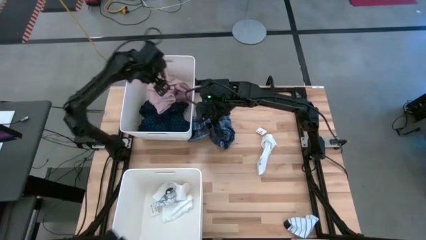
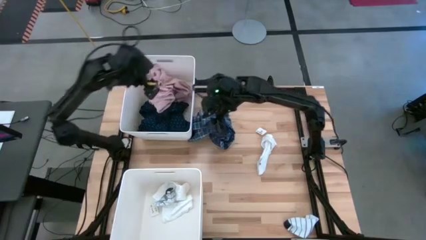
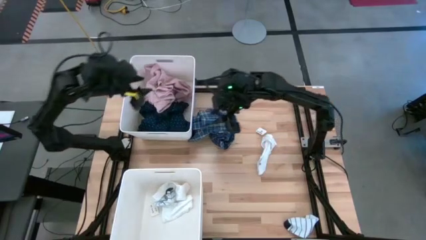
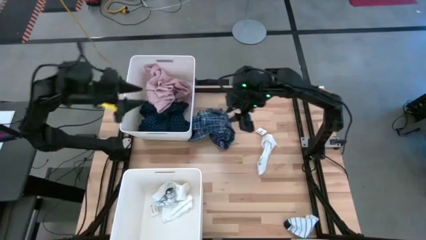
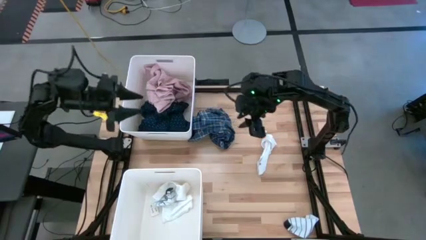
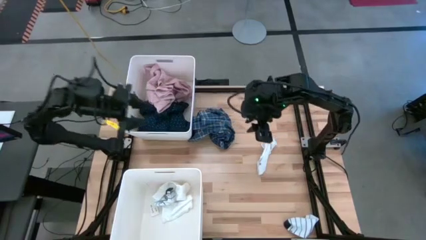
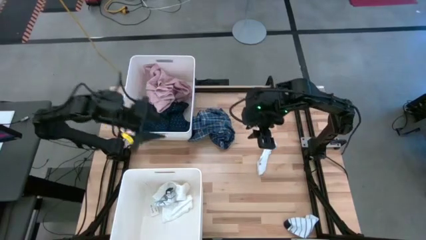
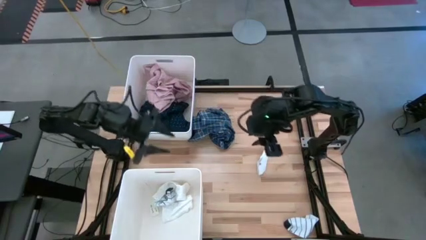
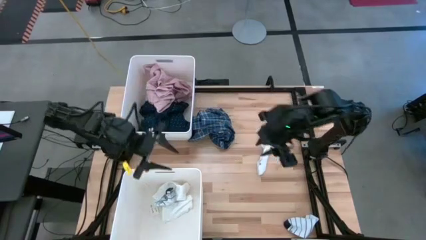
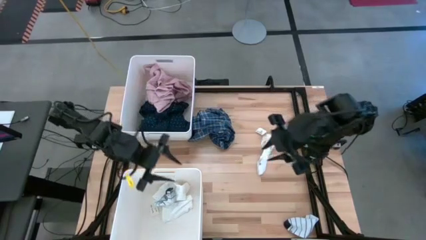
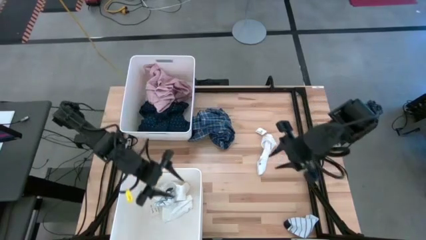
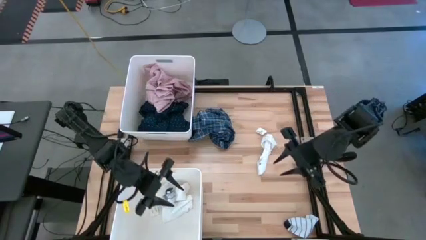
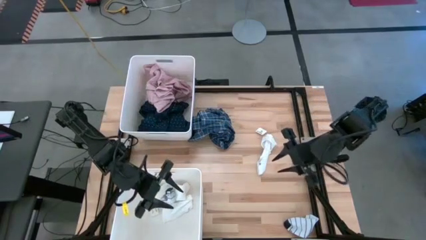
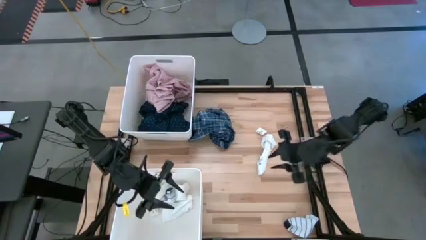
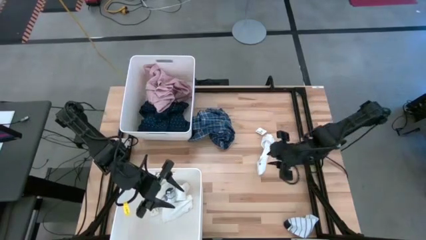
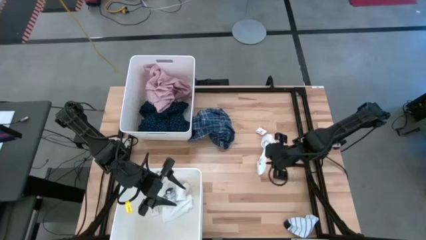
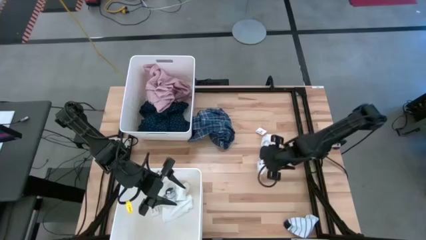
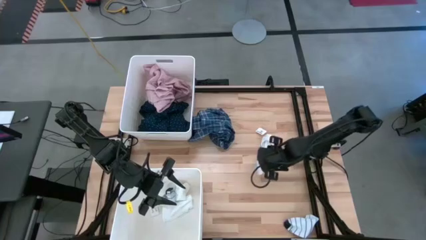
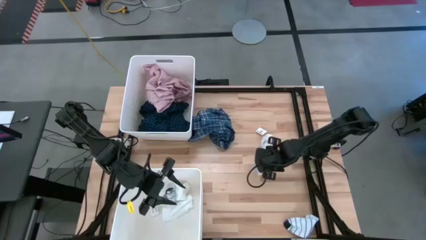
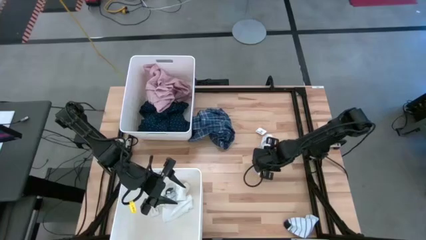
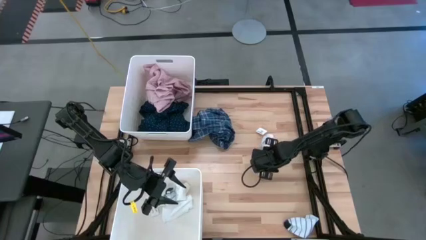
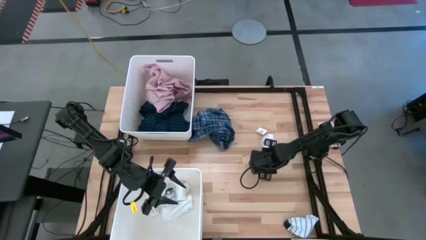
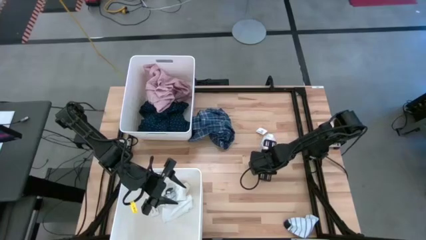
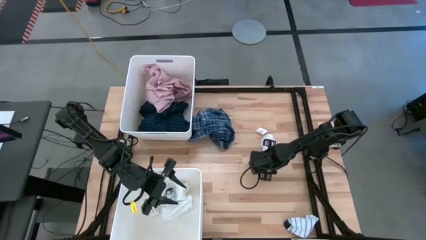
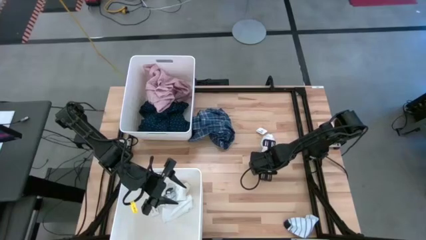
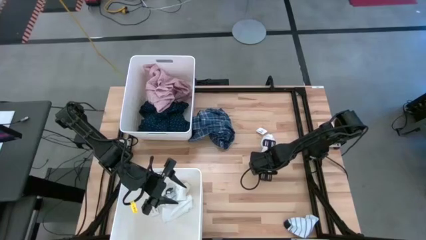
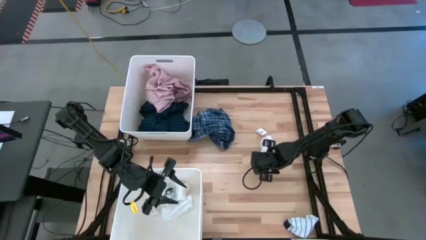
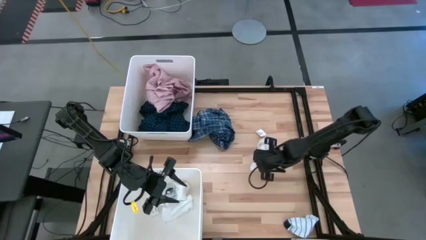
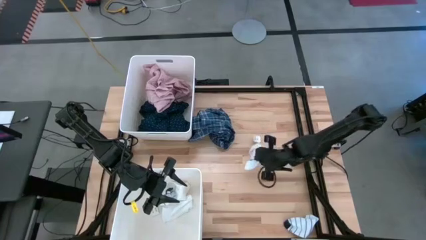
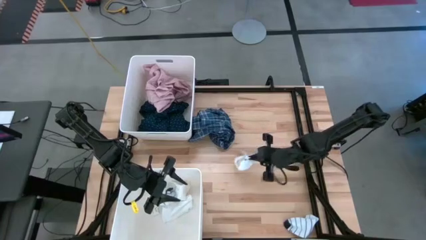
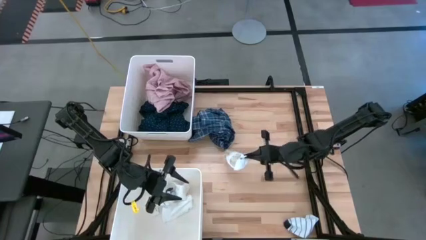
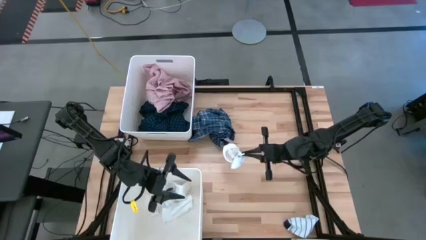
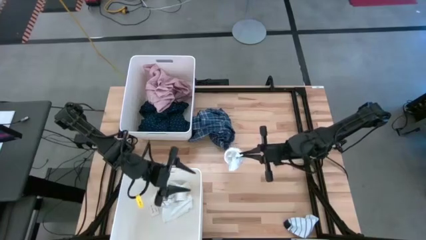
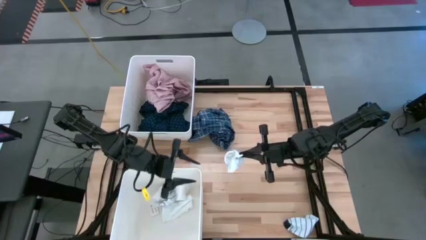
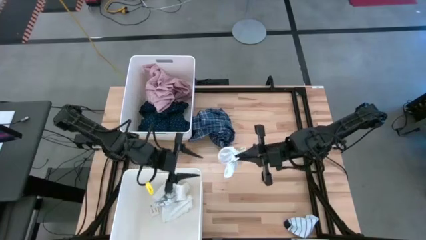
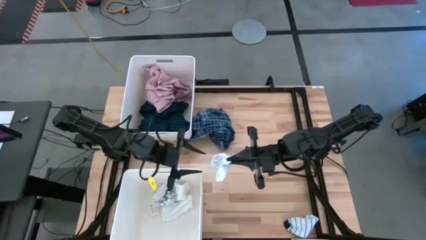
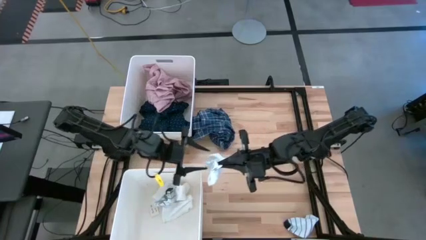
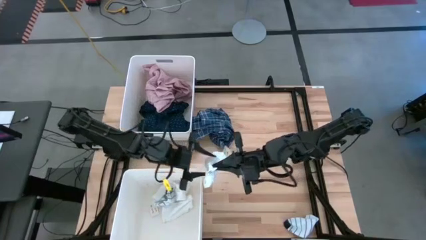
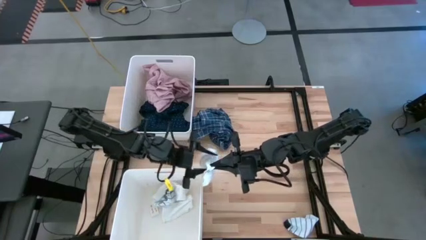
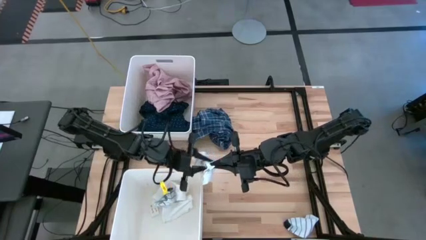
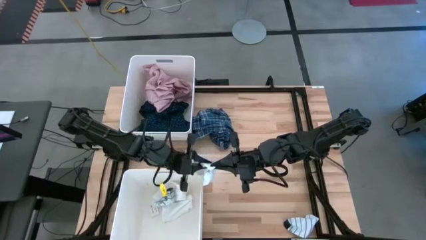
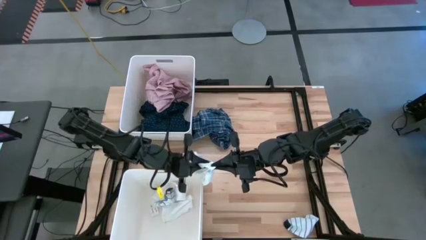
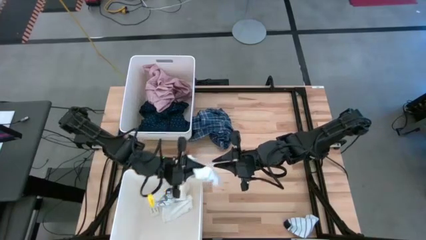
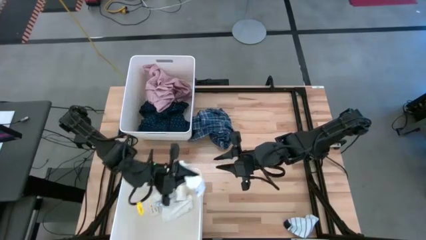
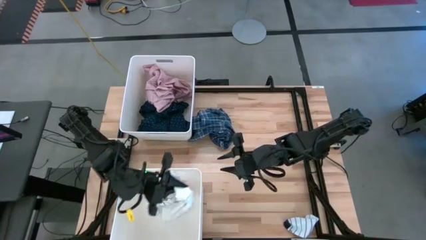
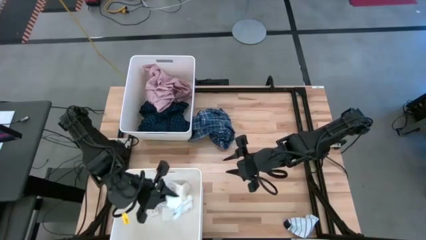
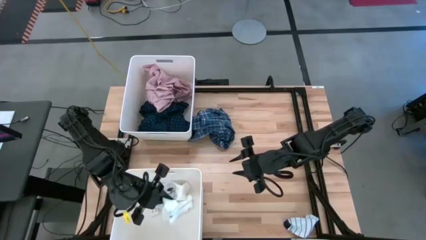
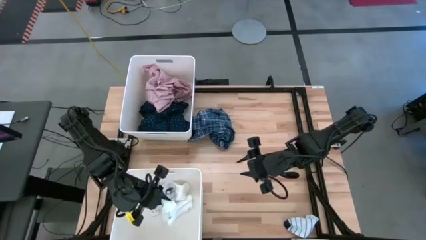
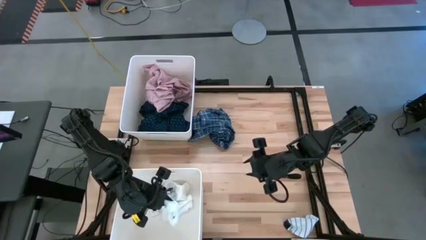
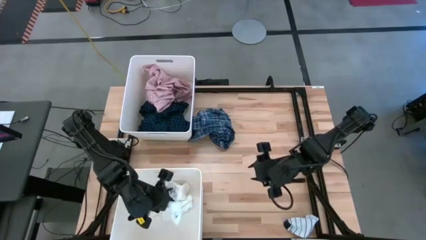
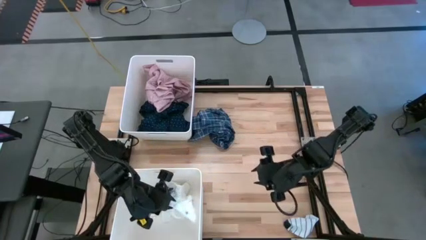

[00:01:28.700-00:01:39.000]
Task: Sort clothes
Put the white sock into the bottom white bin

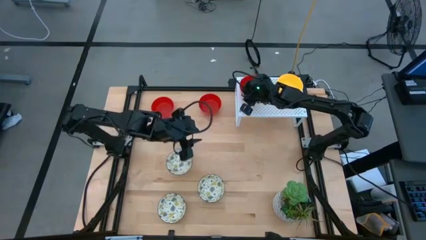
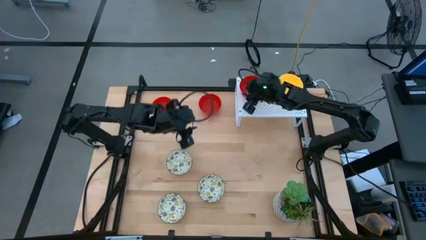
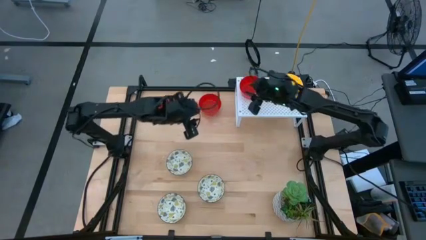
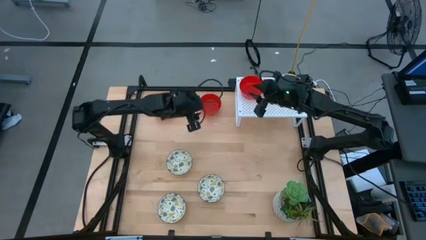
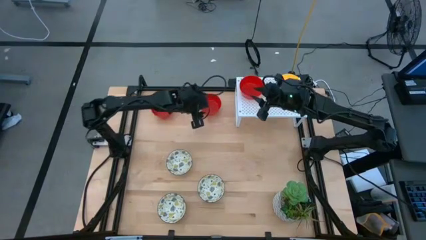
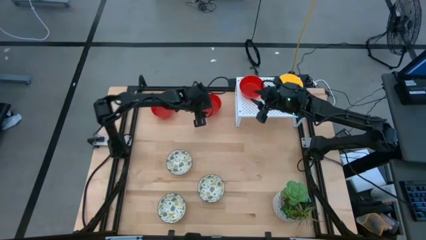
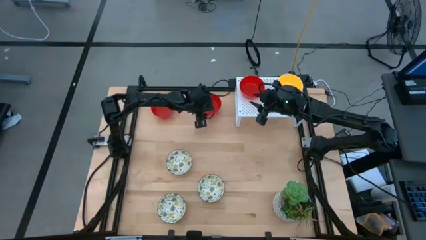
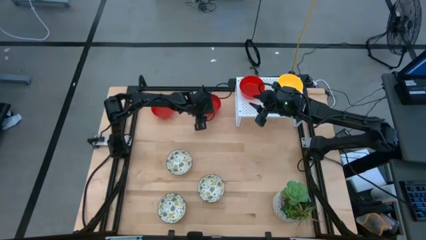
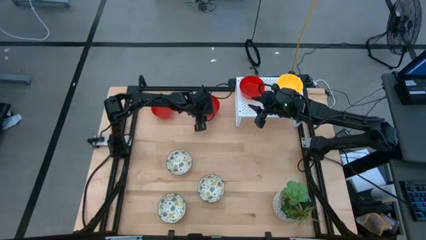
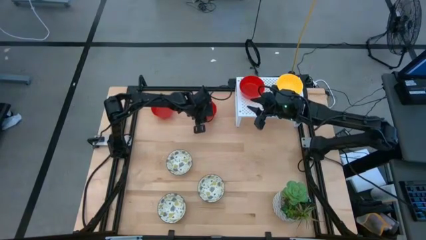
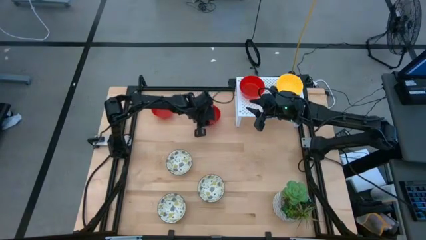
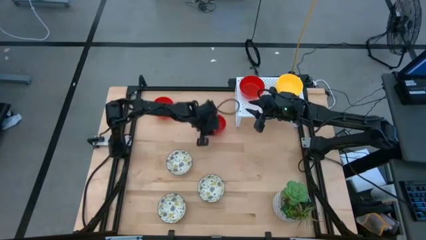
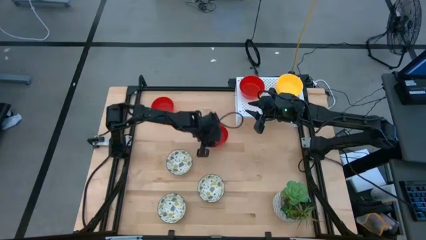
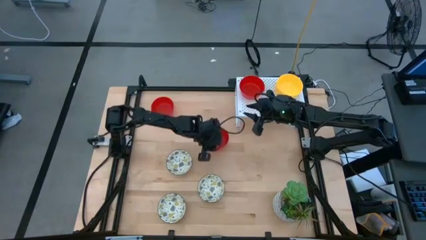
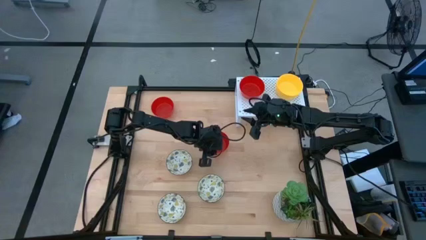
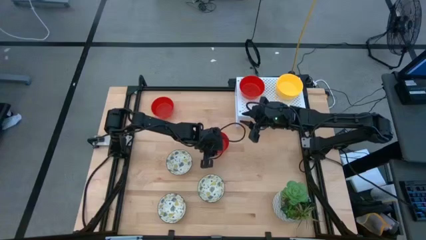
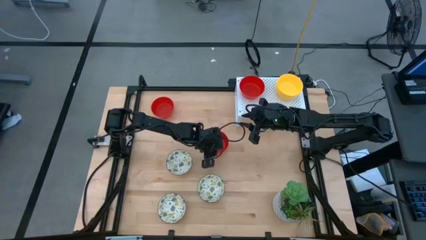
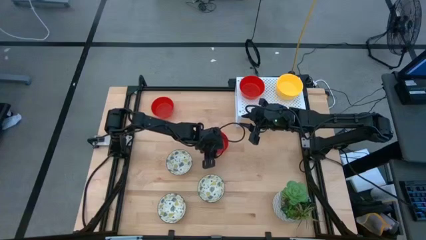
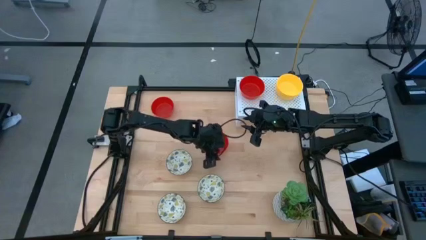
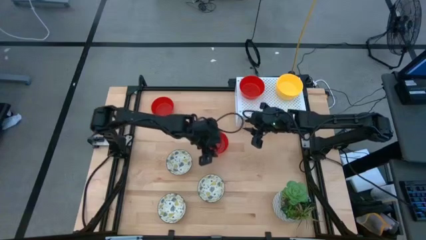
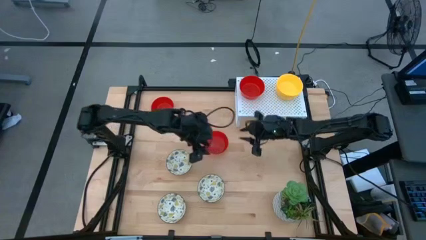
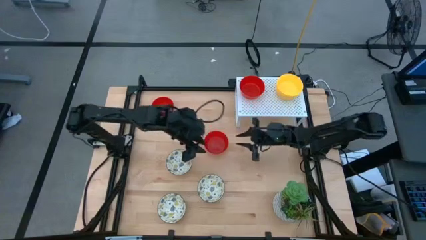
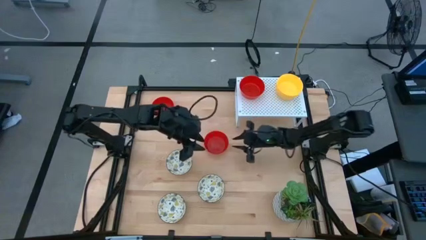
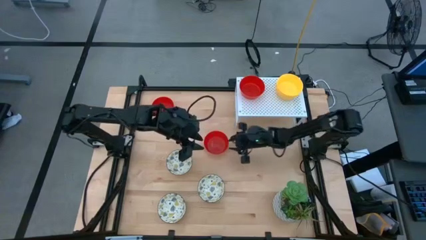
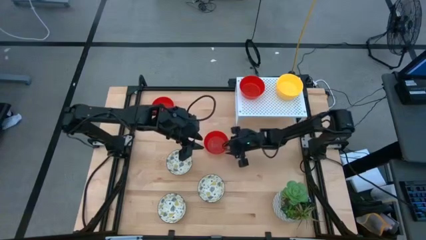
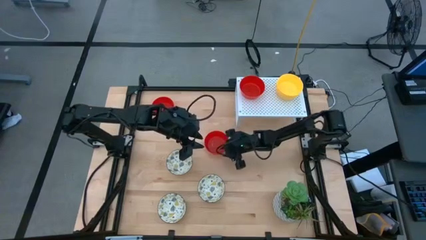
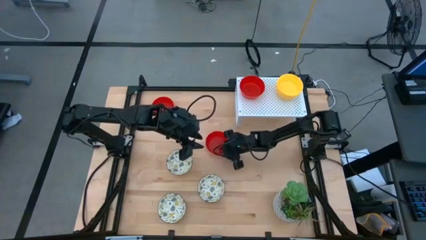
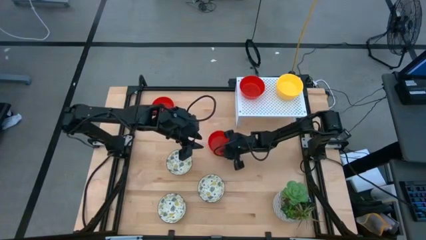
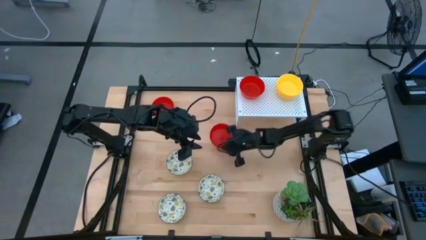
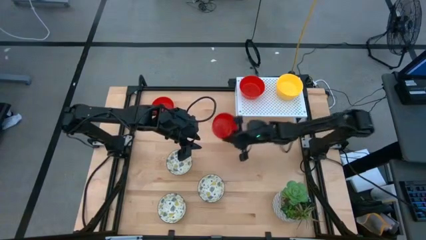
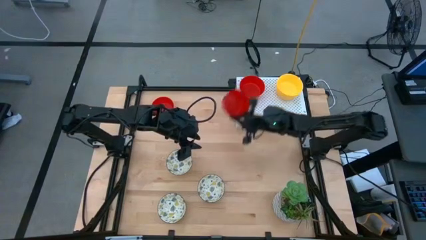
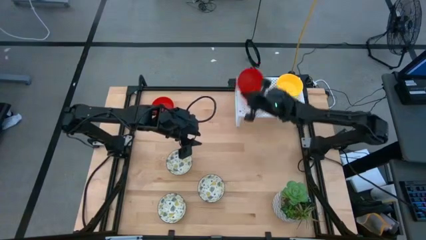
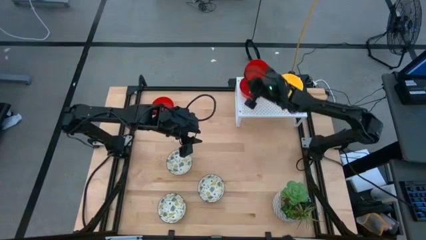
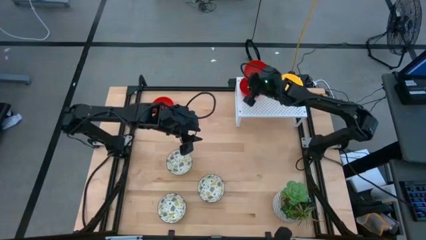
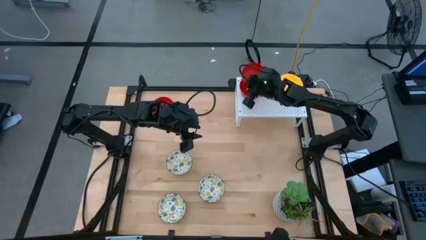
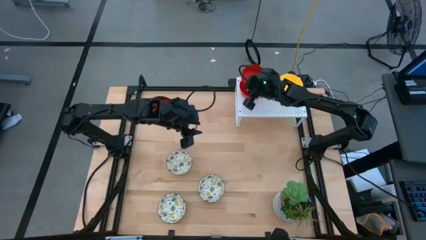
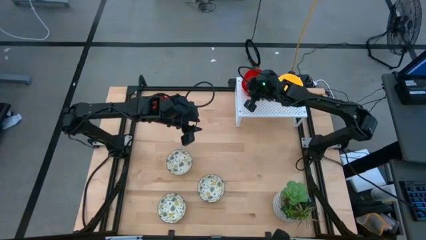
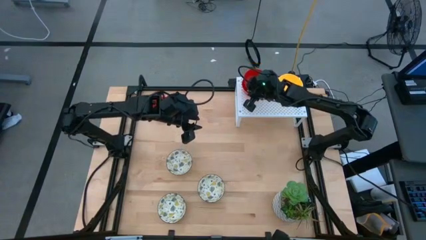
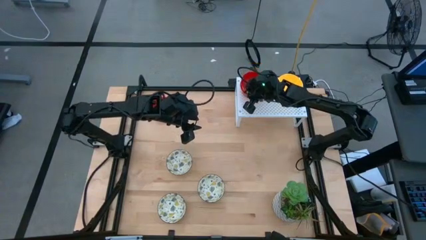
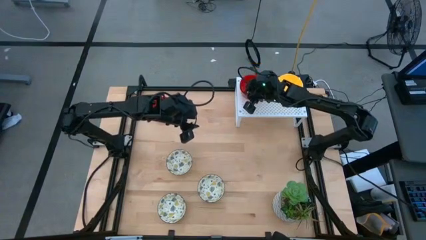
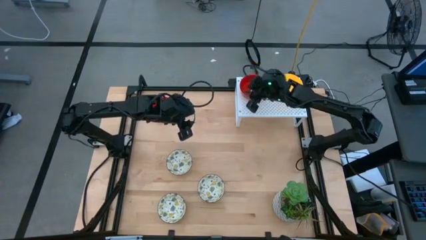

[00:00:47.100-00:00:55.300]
Task: Pick & Place Mini bowls
Stack the red bowl on top of the red bowl on the shelf
